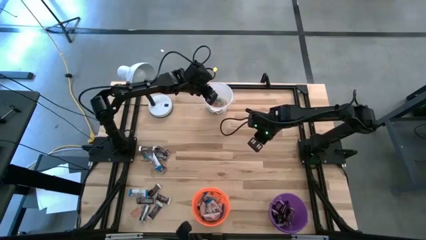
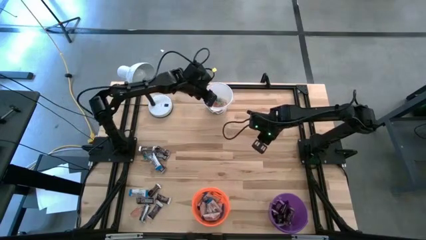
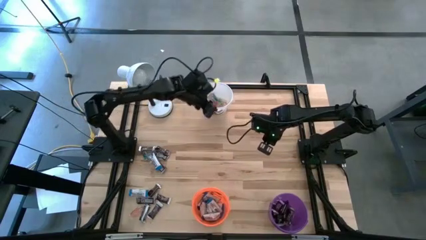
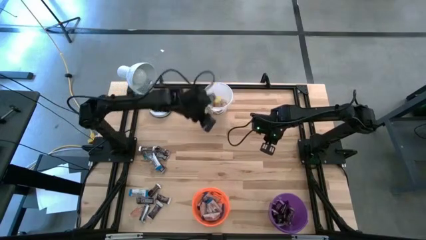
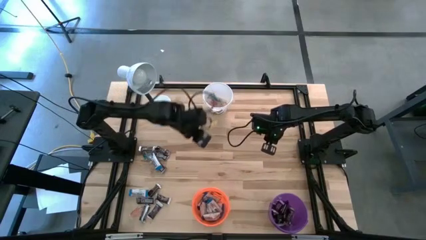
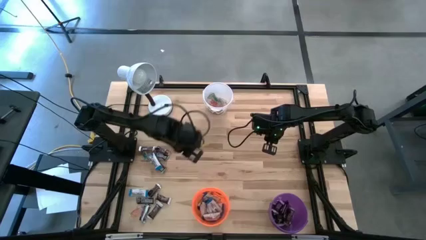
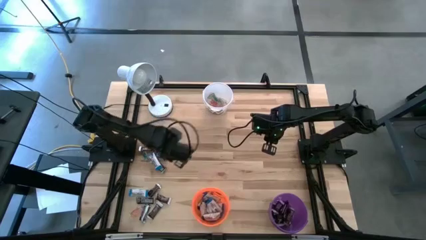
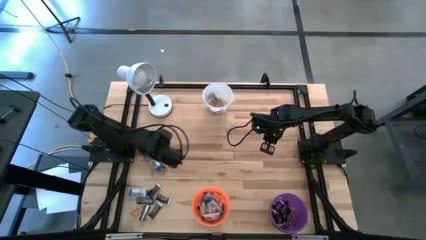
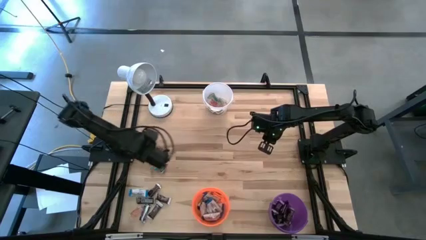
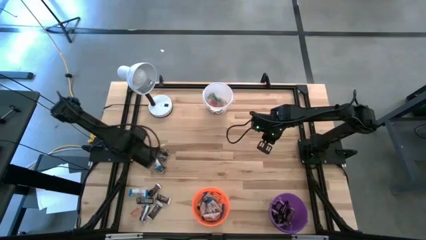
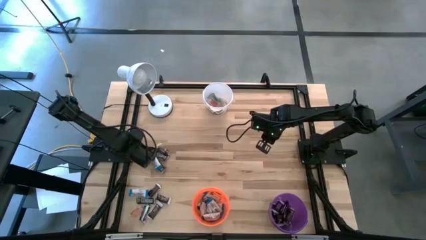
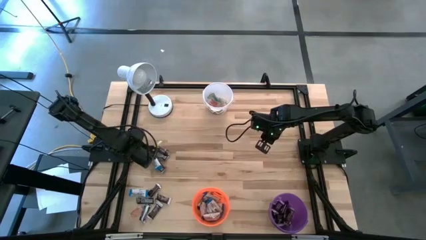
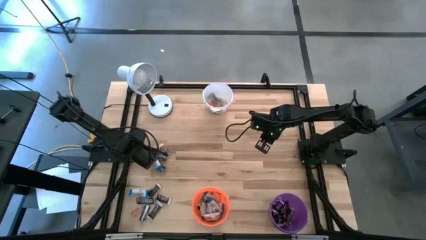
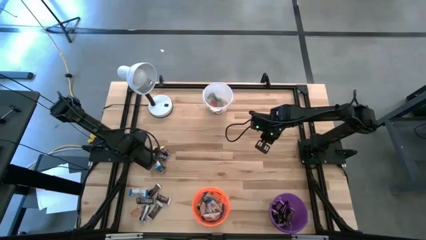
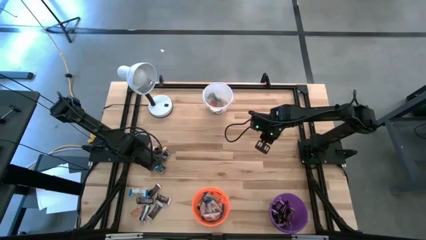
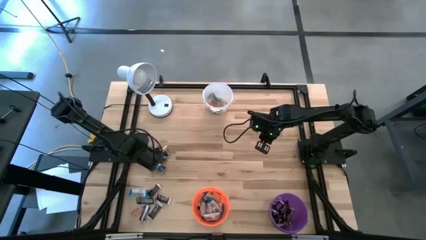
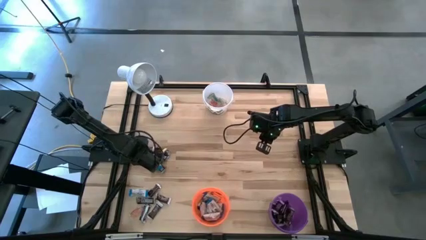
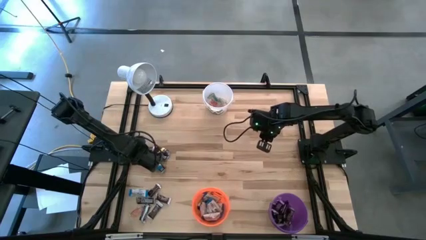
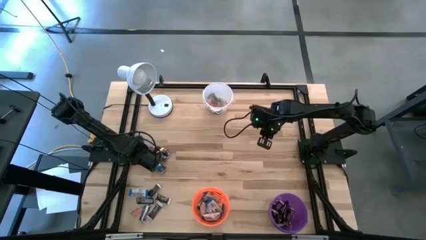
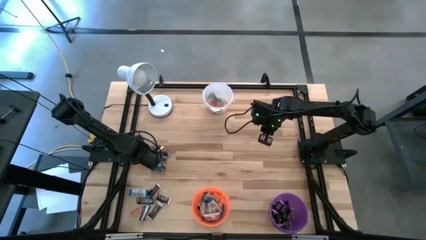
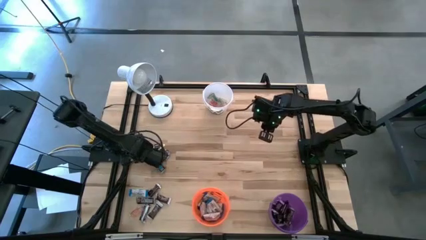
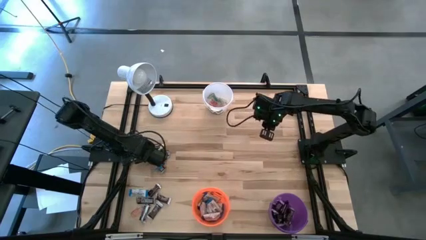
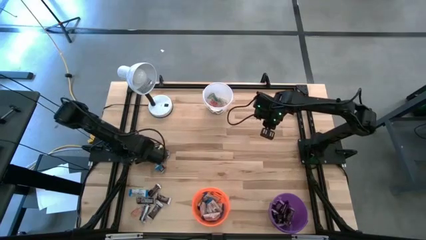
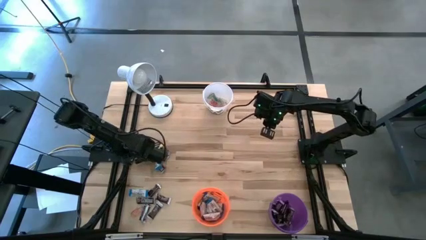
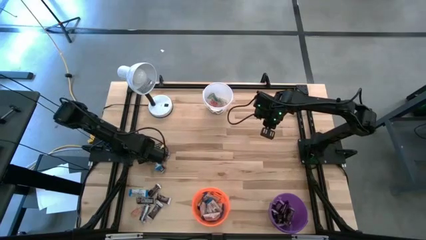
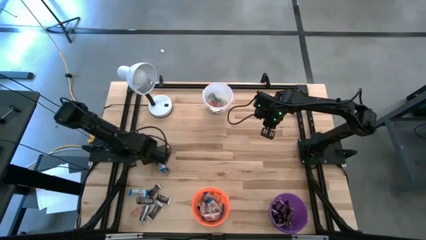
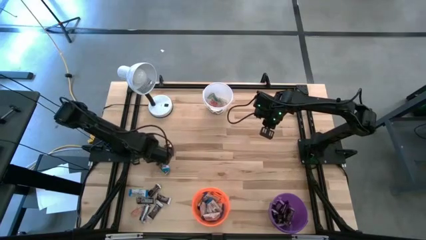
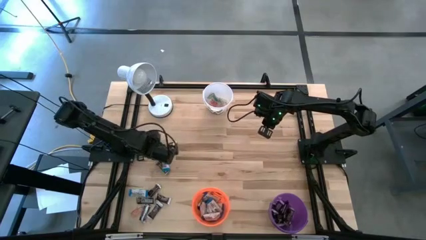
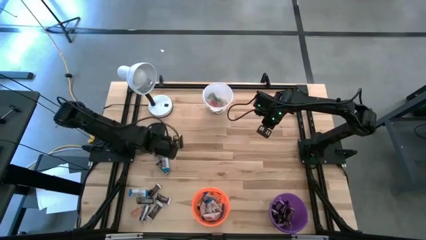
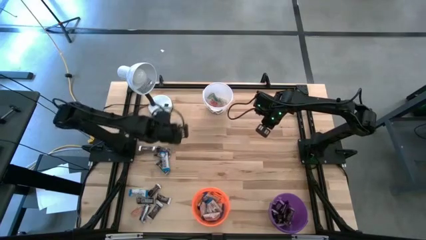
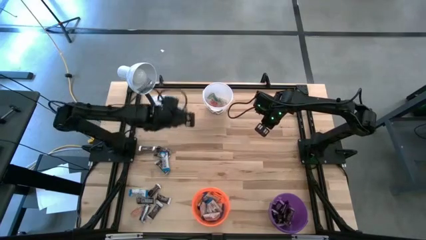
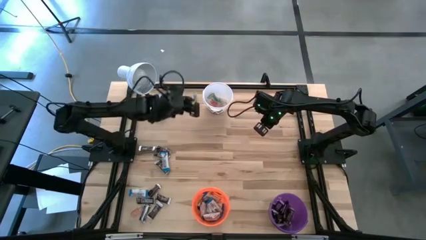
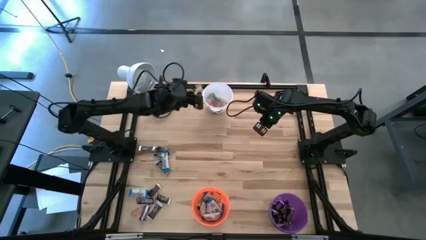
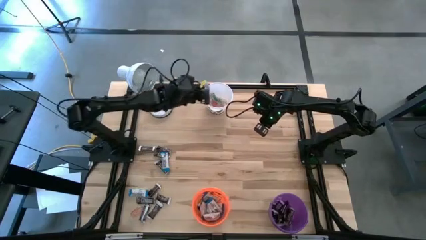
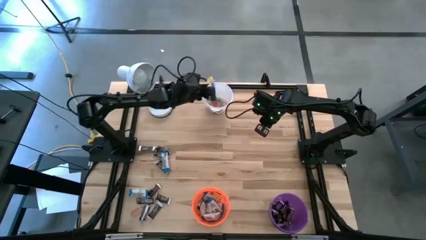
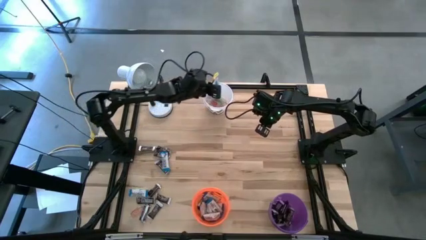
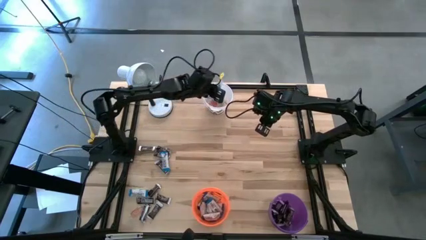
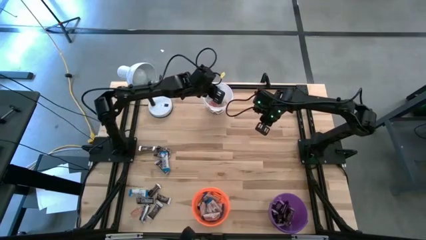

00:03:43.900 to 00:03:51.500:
Task: Organize candy in baskets
Put the blue gummy into the white bucket

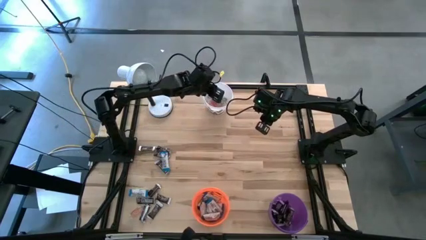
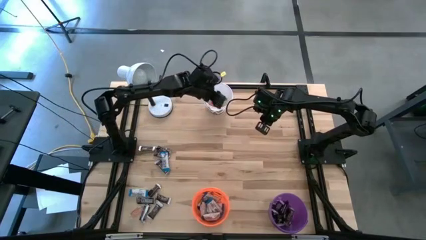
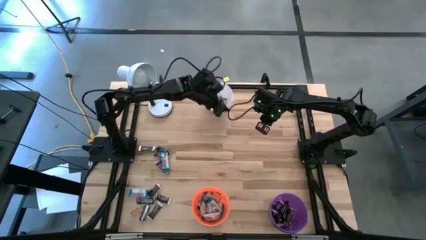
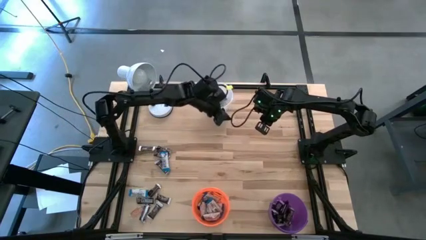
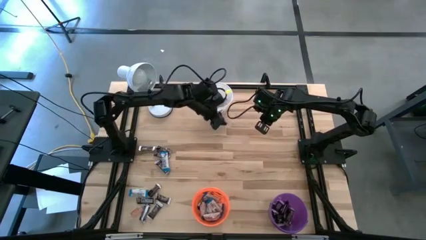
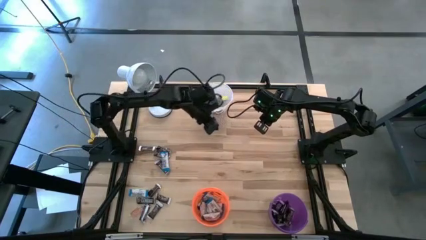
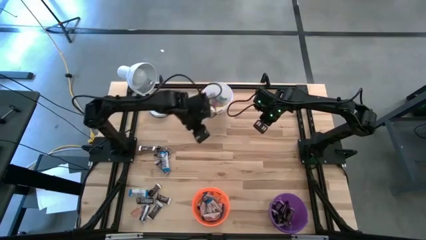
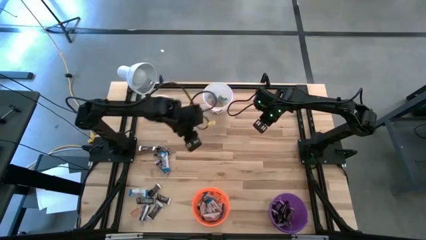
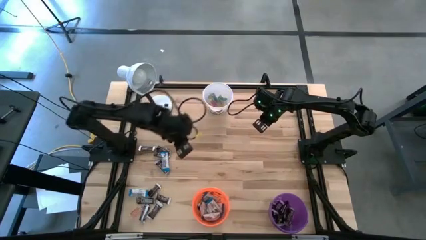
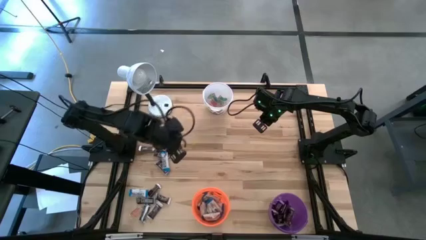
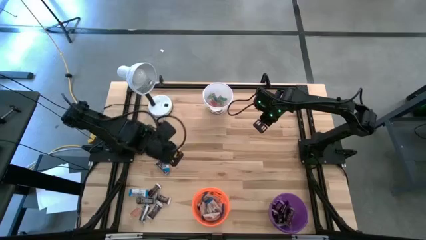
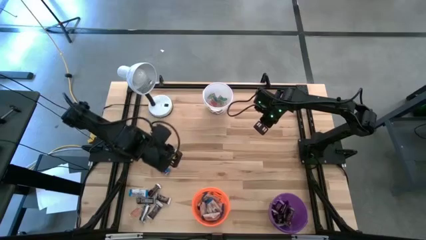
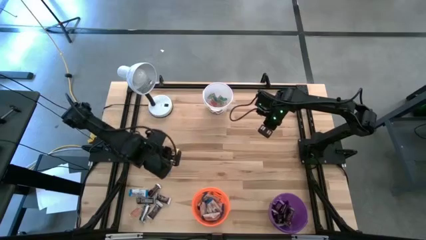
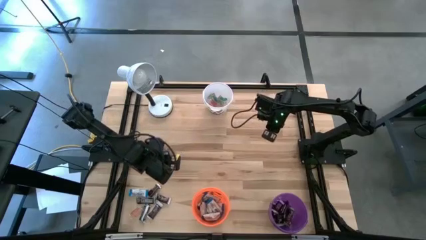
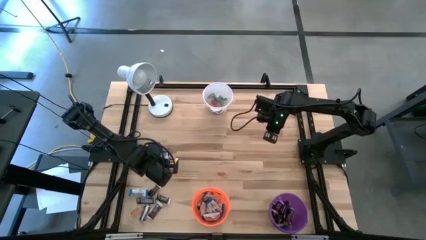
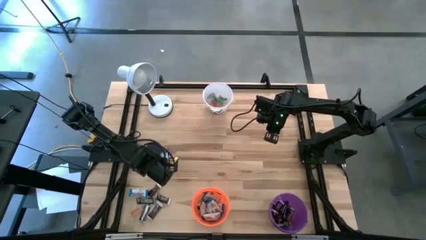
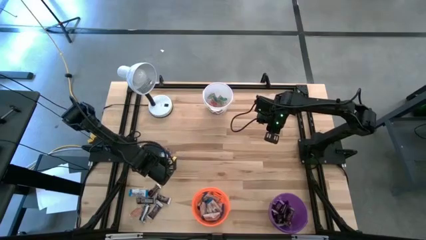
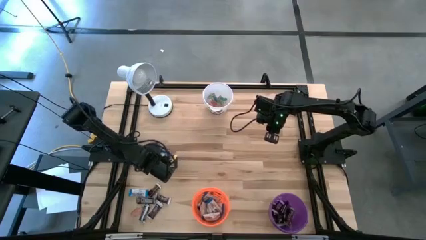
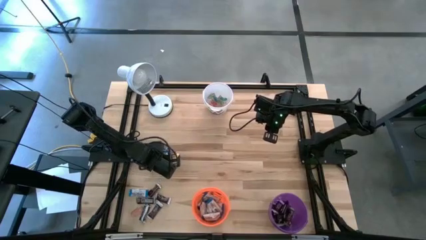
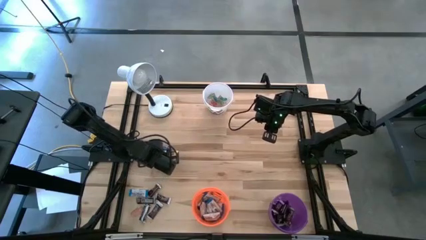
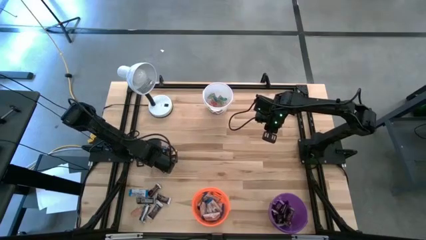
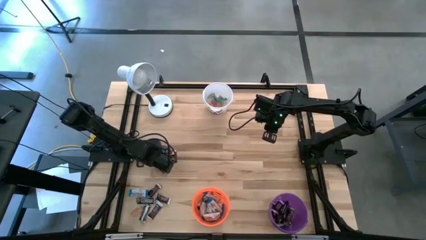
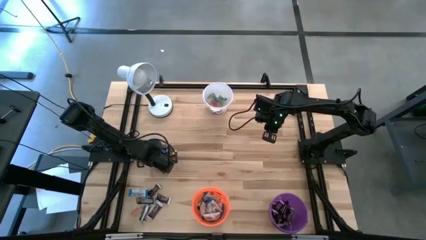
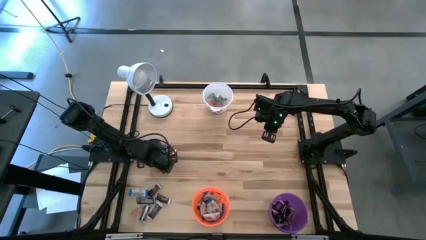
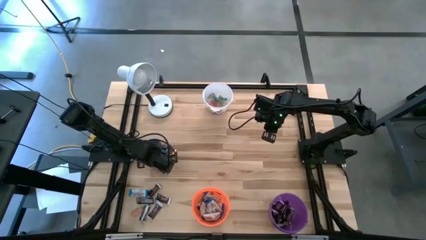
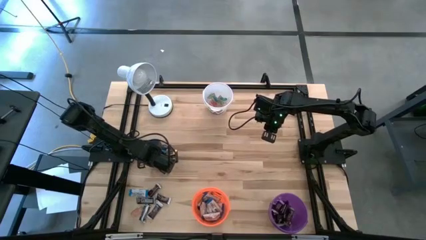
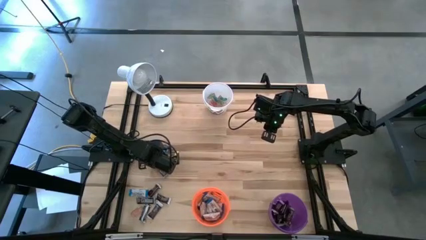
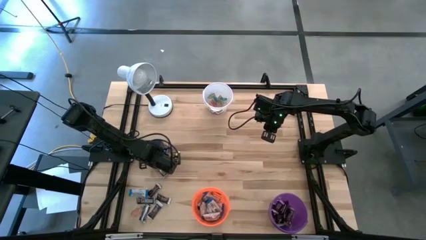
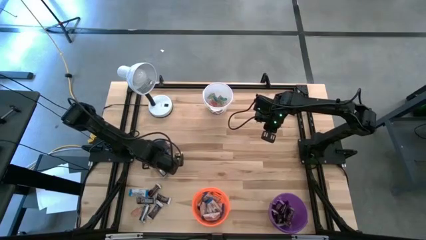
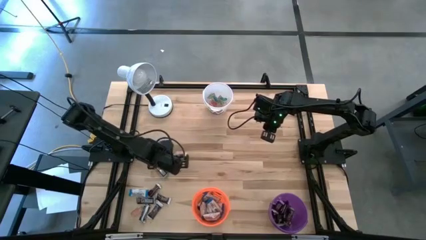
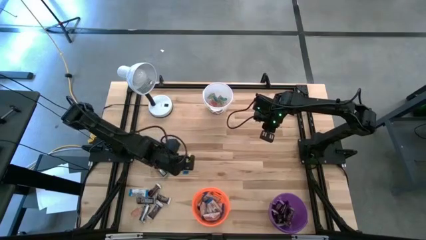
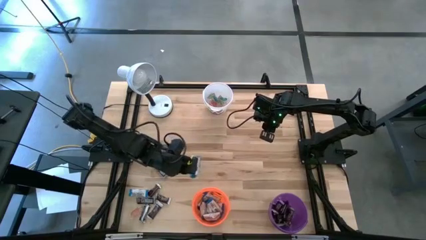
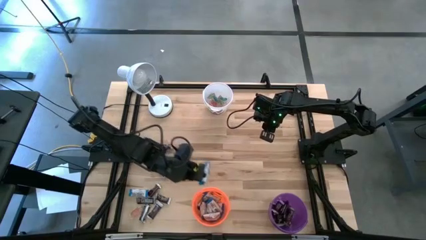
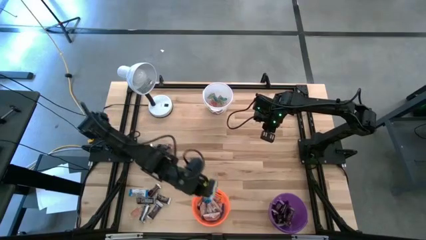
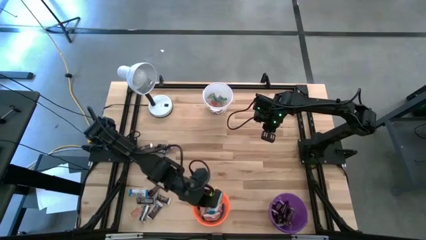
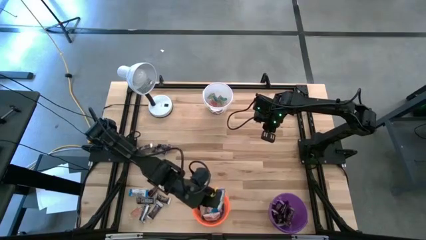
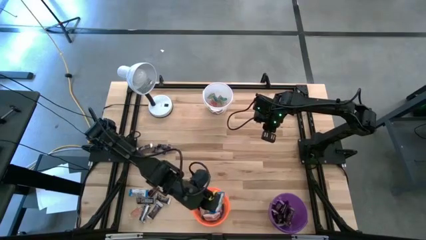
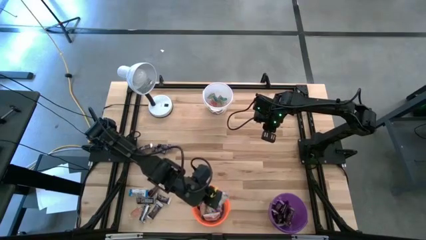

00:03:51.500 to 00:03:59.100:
Put the white chocolate bar into the orange bucket
